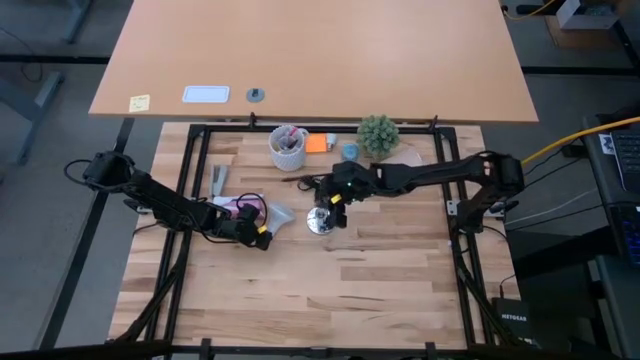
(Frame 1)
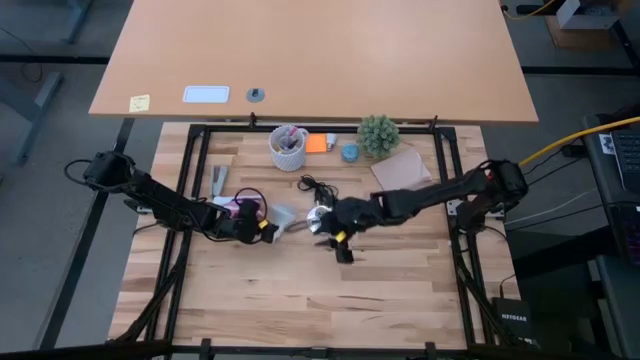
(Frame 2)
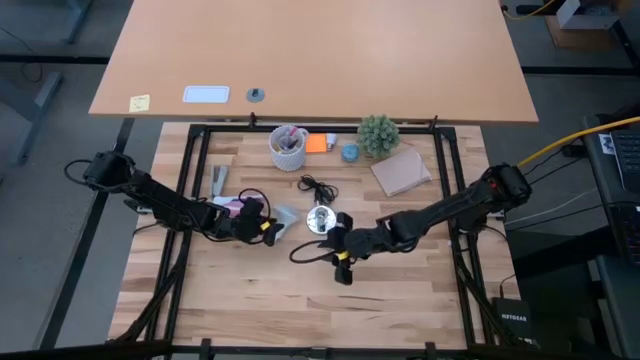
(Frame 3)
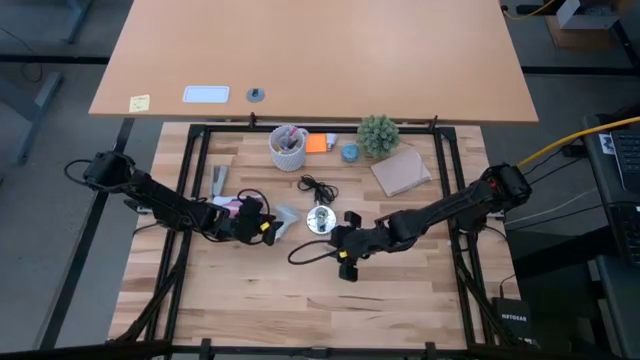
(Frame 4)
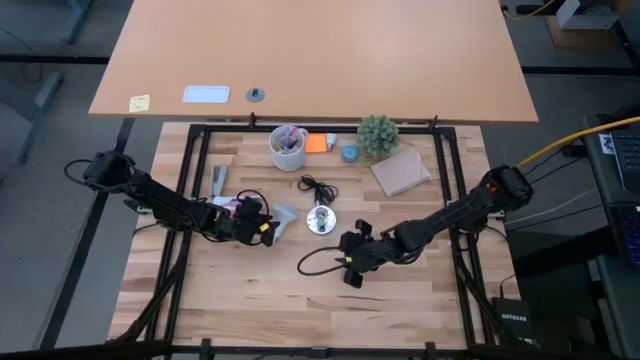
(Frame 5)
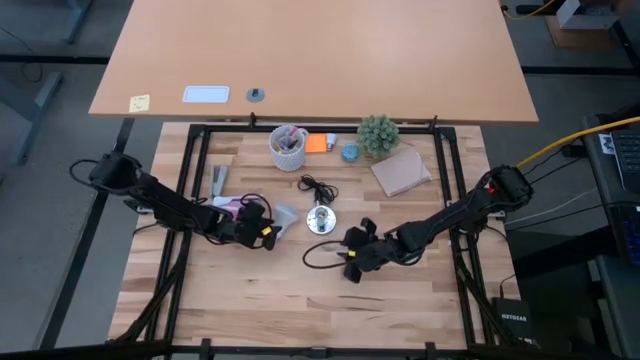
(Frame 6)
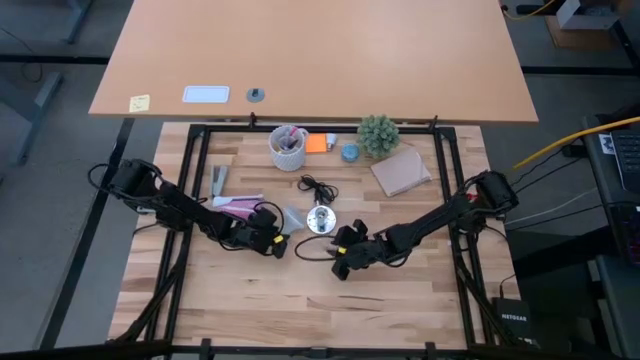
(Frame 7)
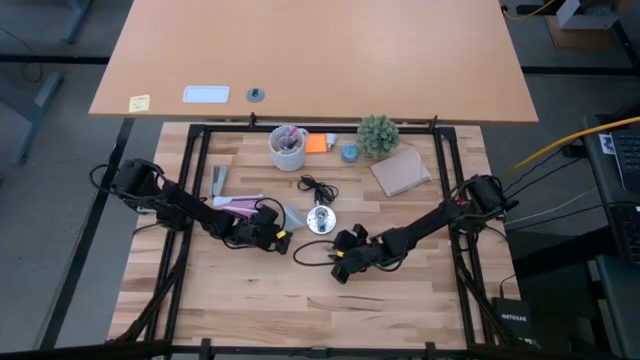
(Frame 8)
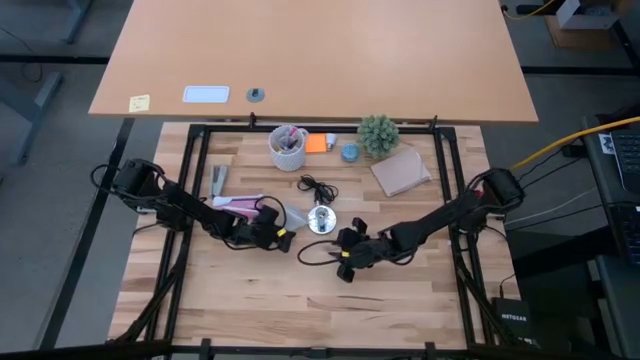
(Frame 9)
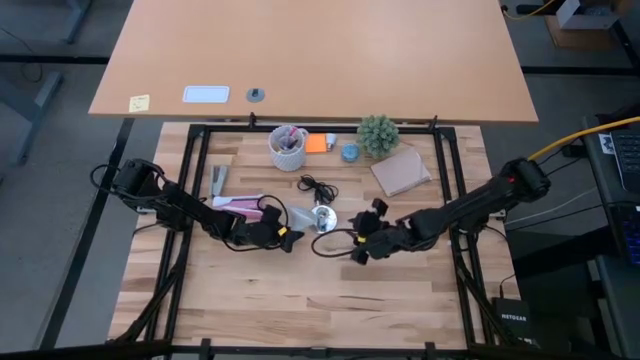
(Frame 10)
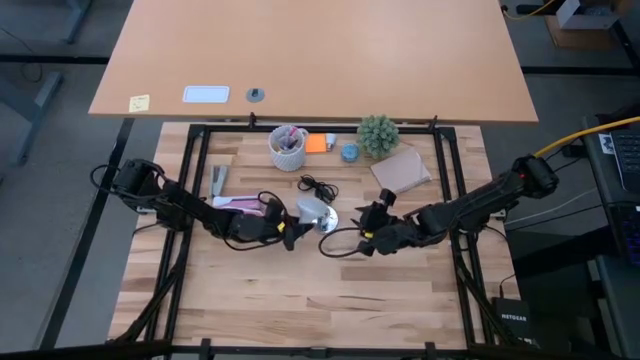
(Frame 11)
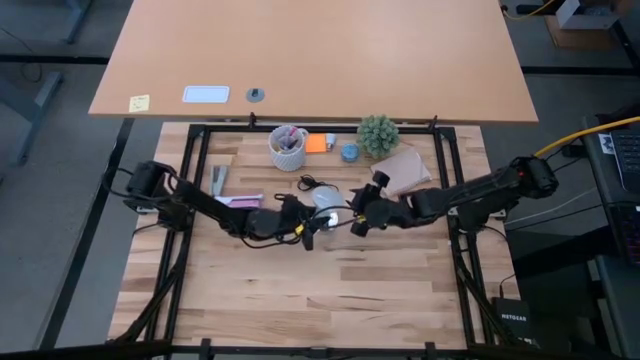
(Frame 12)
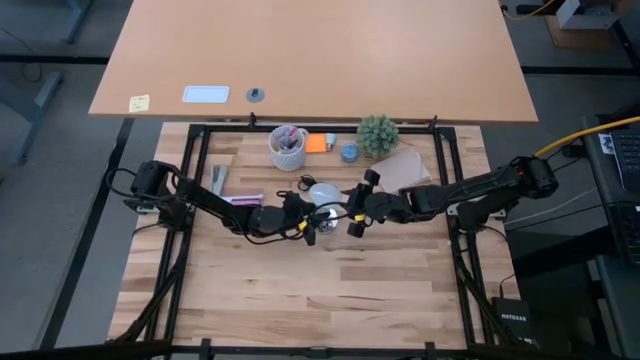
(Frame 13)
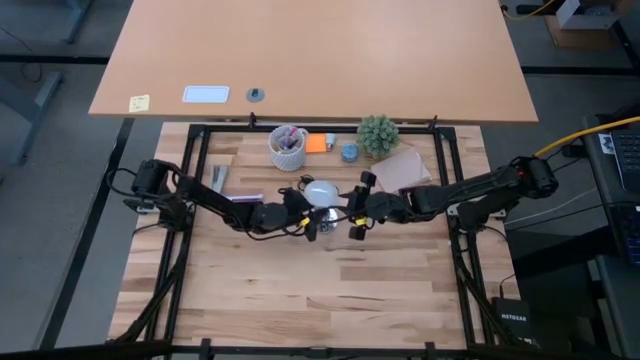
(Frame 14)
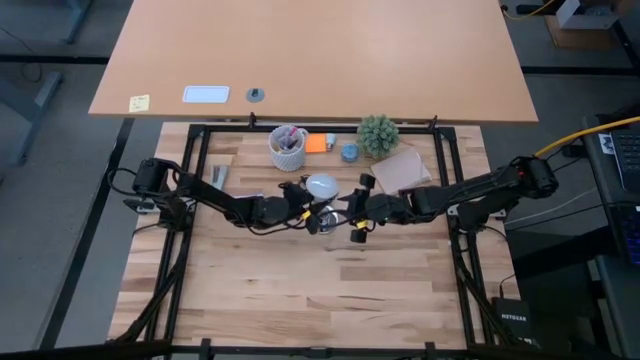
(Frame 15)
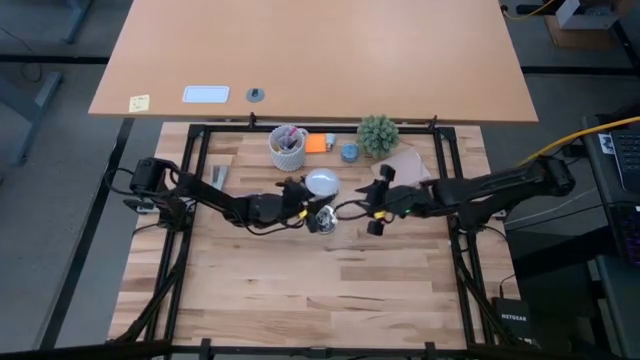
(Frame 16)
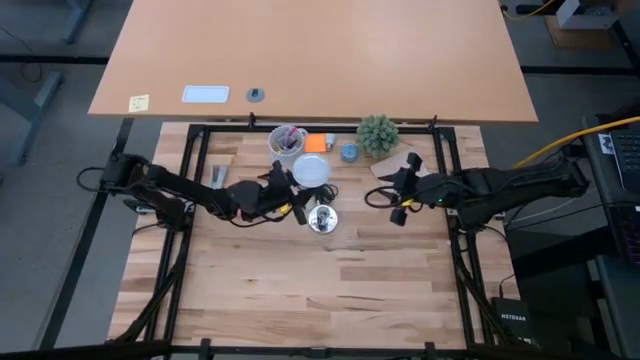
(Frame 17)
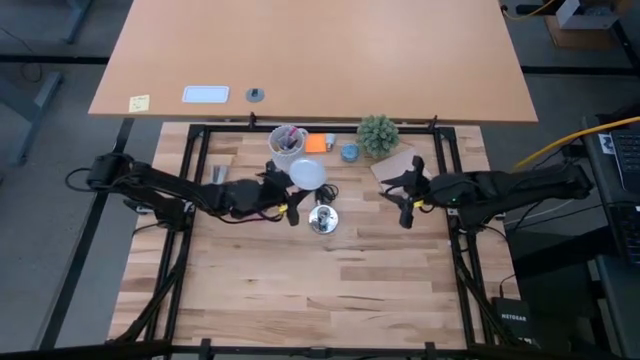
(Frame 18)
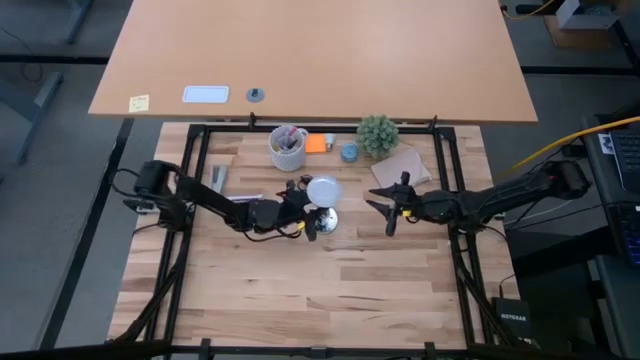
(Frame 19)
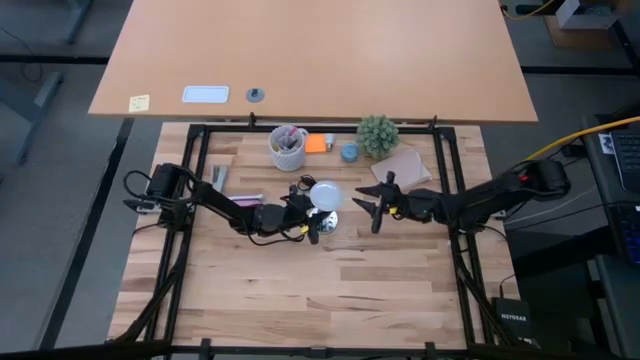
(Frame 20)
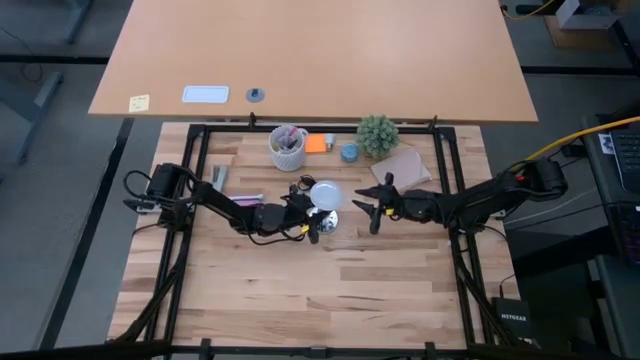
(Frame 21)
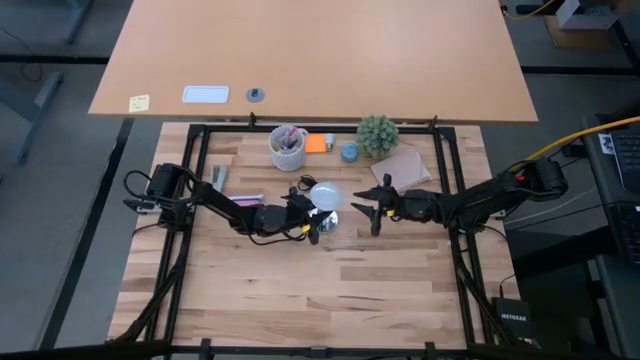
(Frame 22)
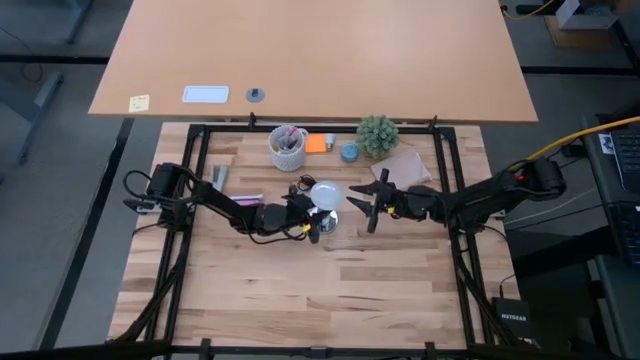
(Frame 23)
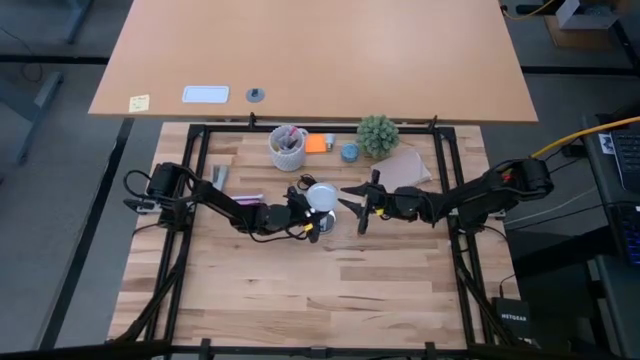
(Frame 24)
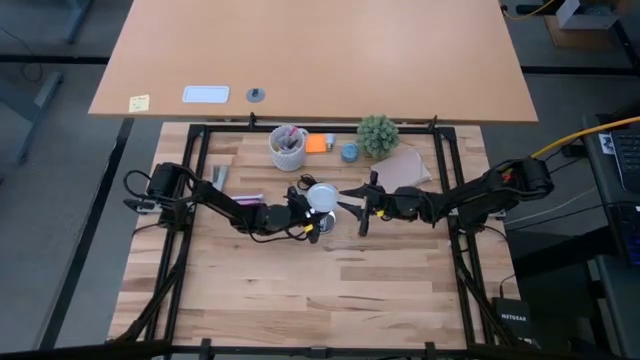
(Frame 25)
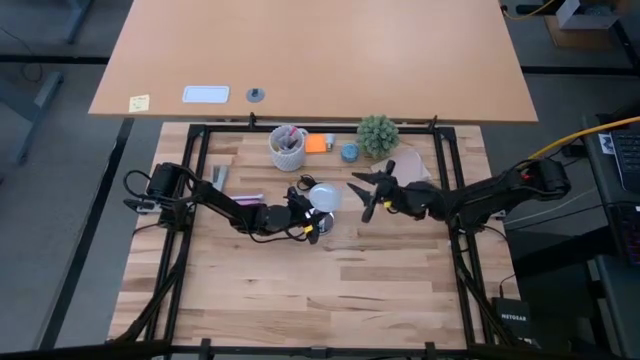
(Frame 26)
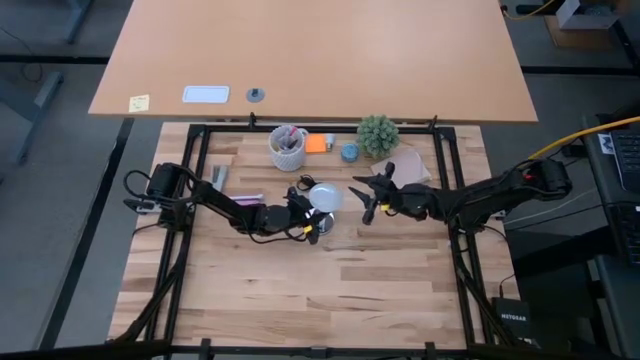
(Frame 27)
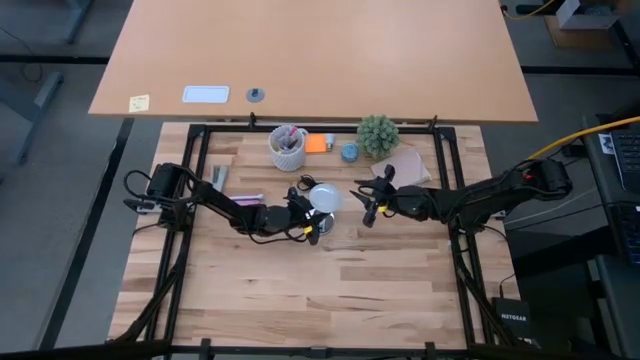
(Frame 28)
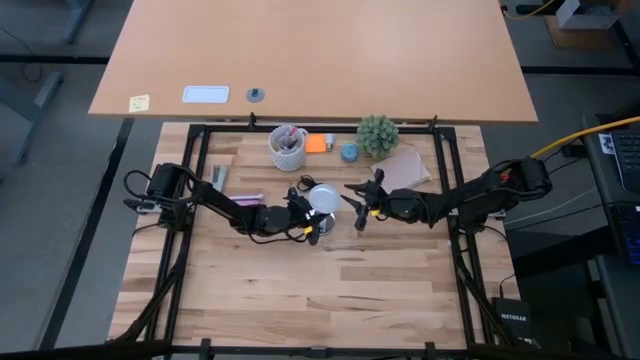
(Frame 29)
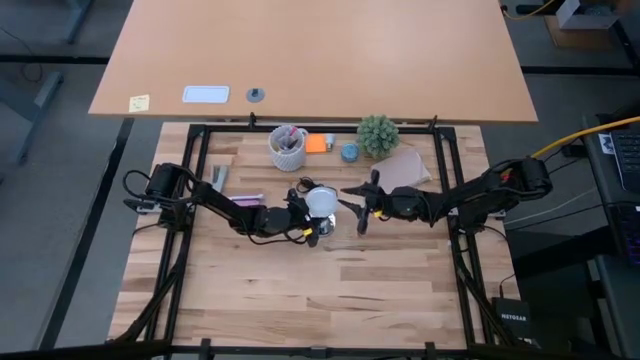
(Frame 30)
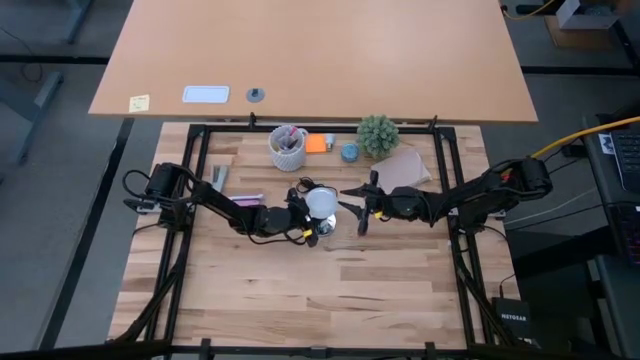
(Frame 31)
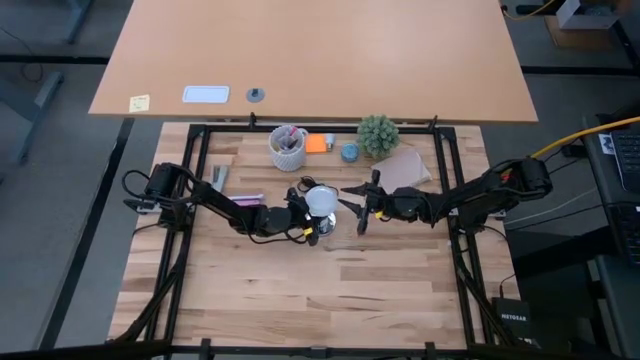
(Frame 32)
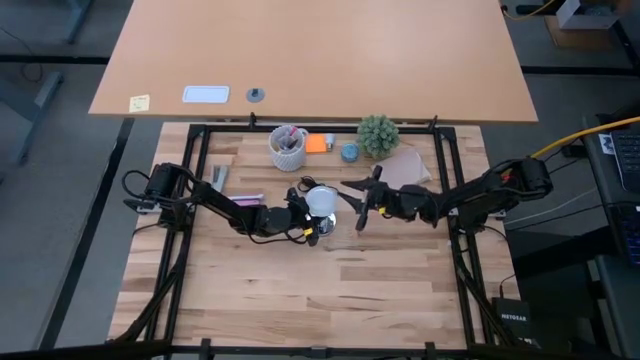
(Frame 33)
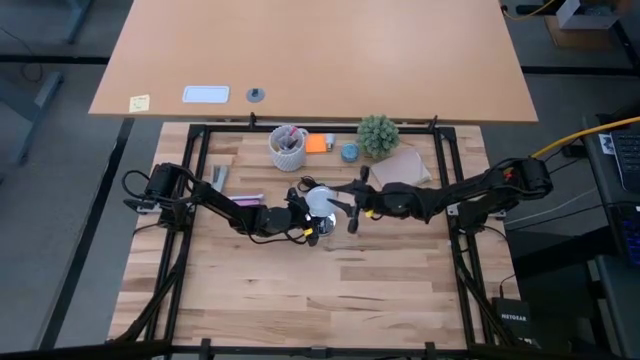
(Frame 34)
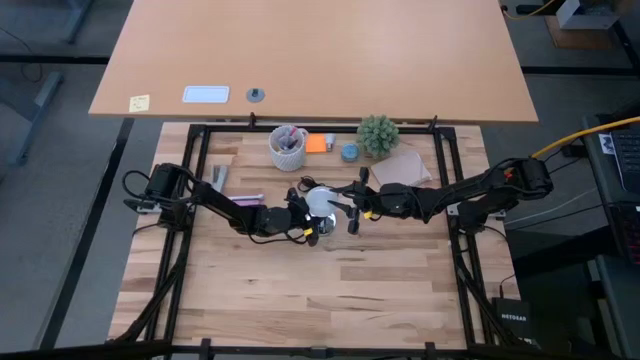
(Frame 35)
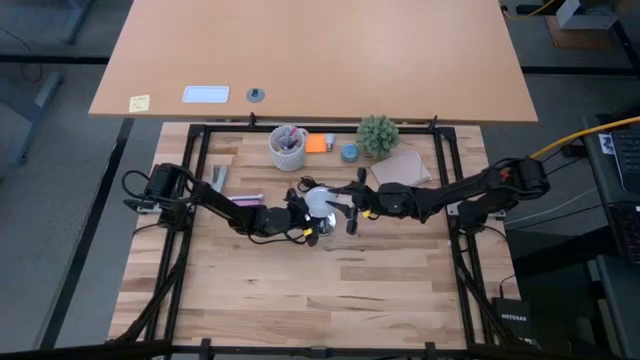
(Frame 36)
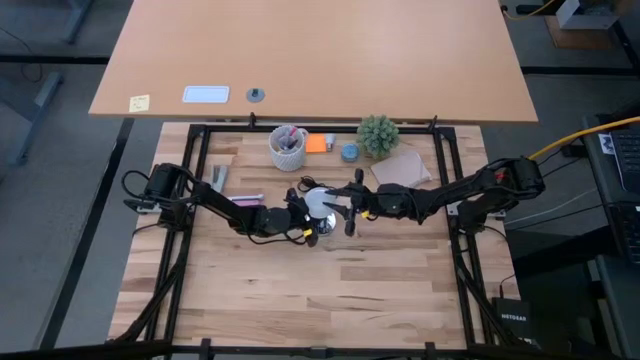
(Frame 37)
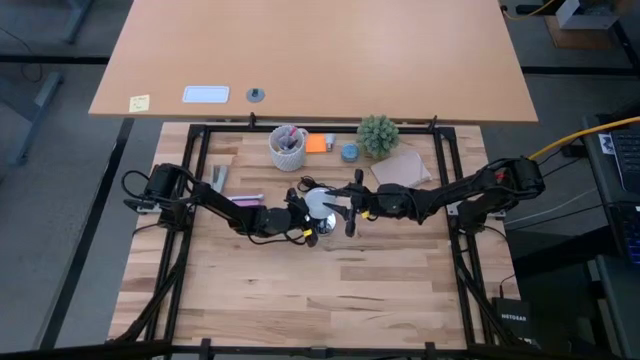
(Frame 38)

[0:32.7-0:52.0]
Task: Screw lightbulb
Insert the white light bulb into the silver lamp
